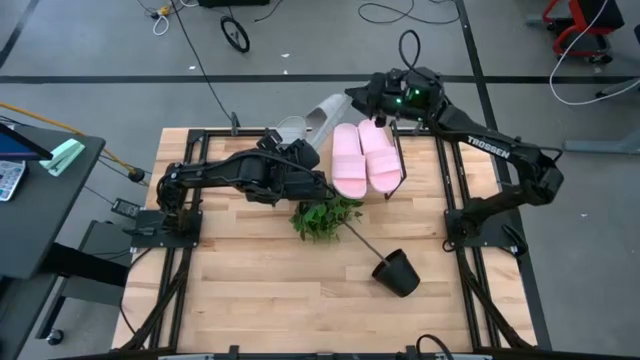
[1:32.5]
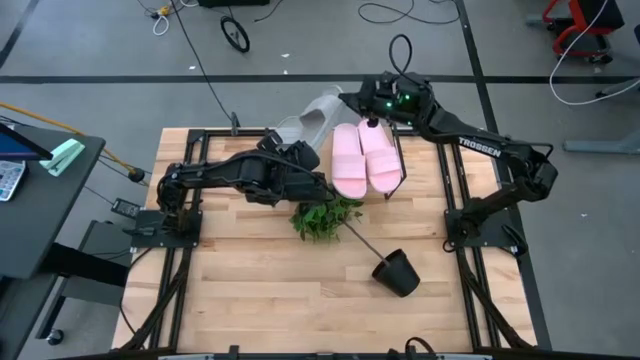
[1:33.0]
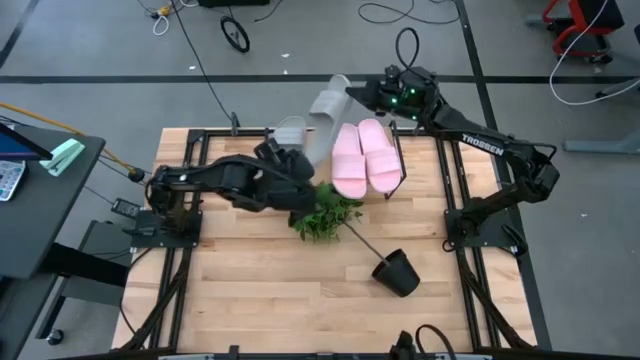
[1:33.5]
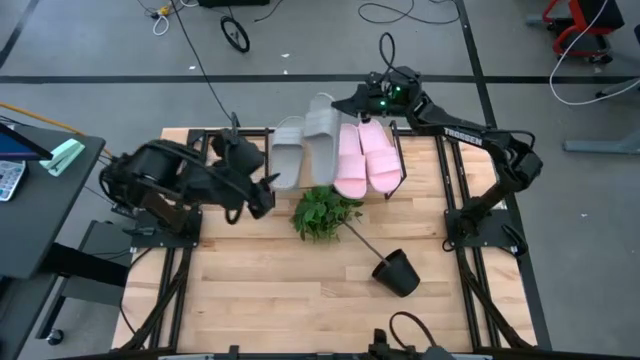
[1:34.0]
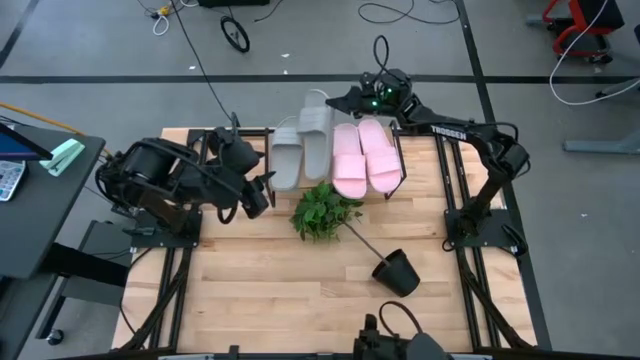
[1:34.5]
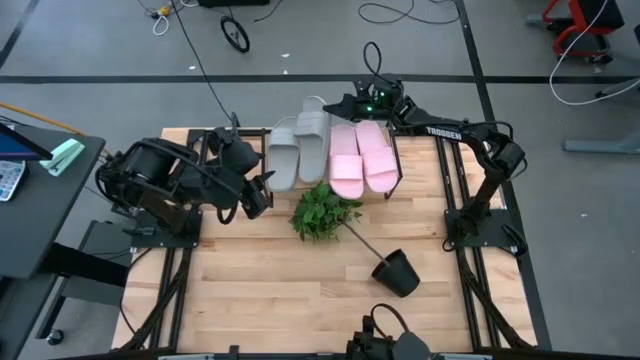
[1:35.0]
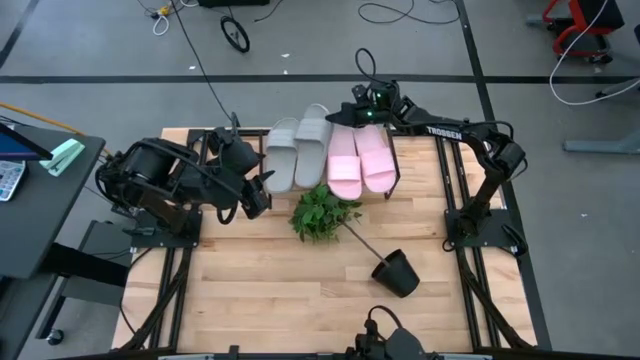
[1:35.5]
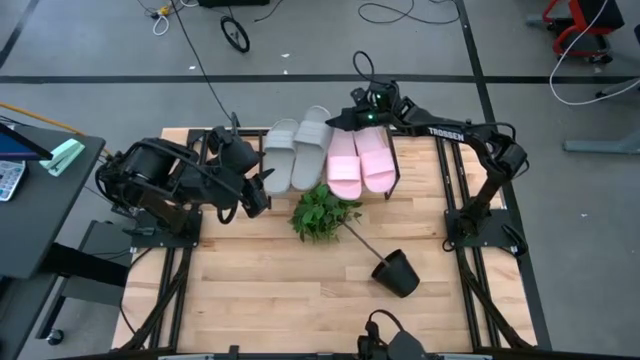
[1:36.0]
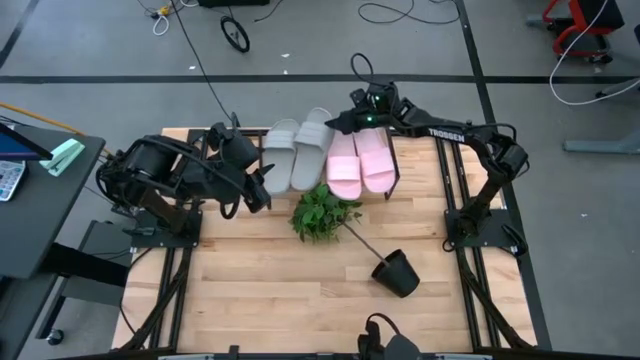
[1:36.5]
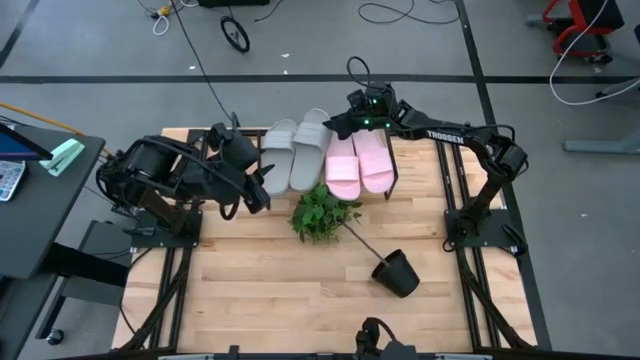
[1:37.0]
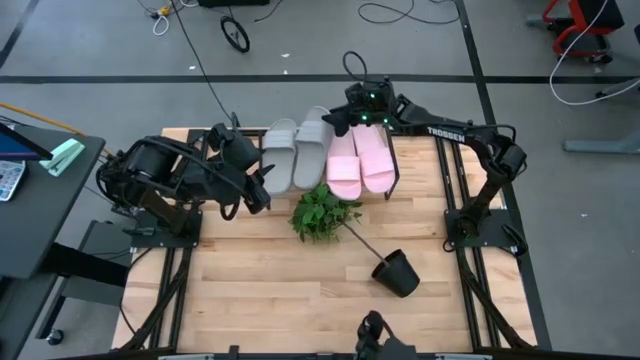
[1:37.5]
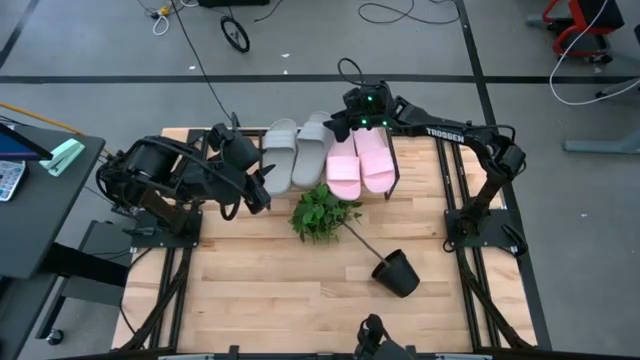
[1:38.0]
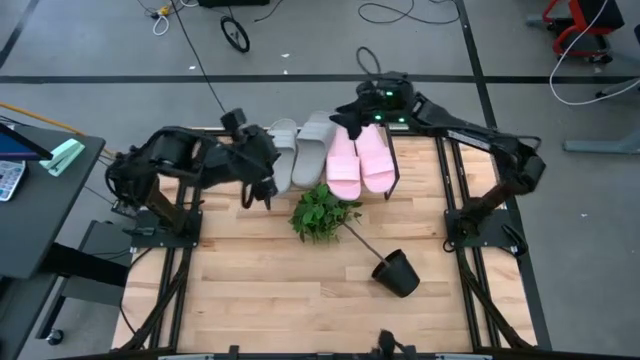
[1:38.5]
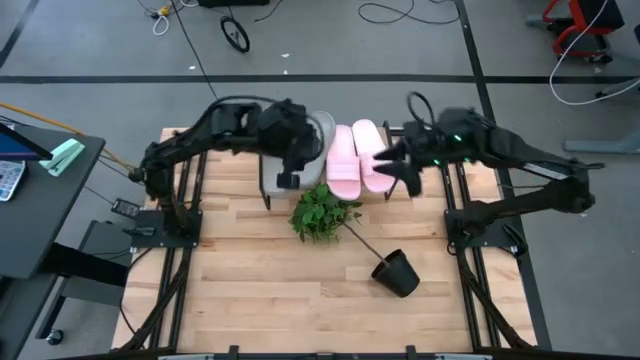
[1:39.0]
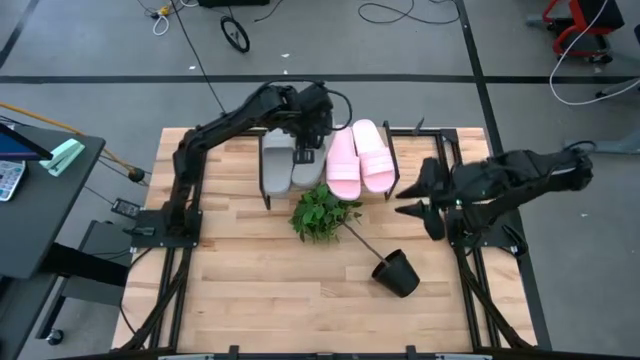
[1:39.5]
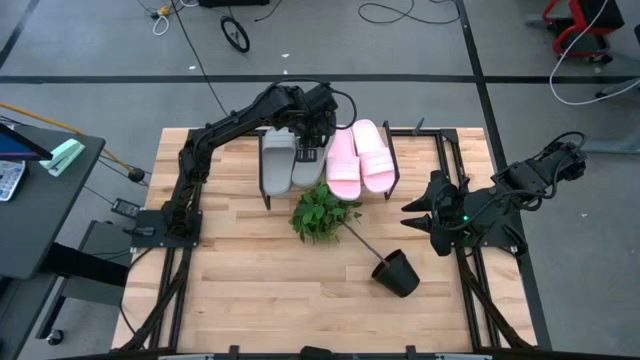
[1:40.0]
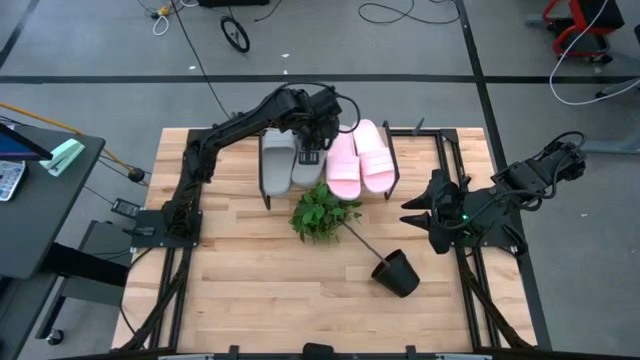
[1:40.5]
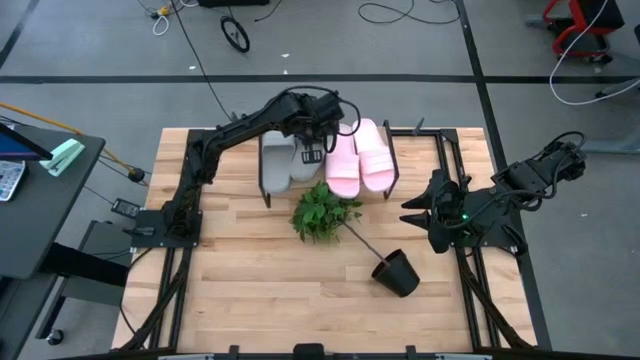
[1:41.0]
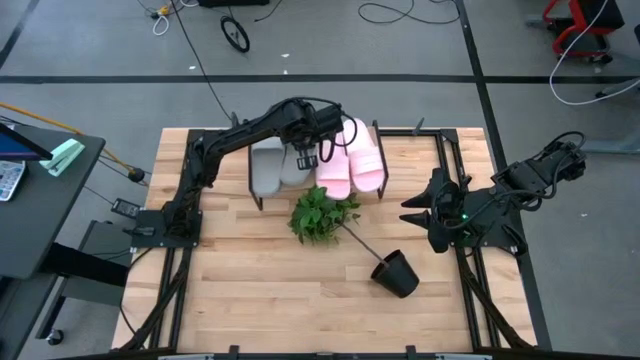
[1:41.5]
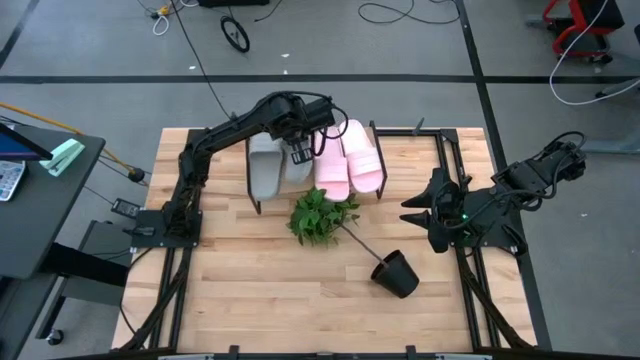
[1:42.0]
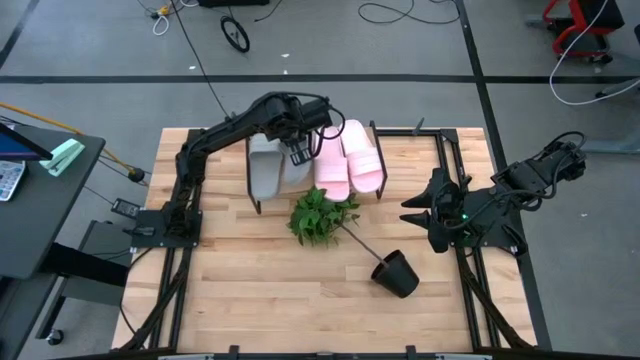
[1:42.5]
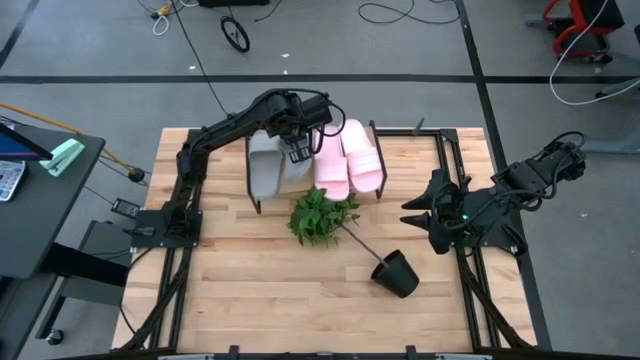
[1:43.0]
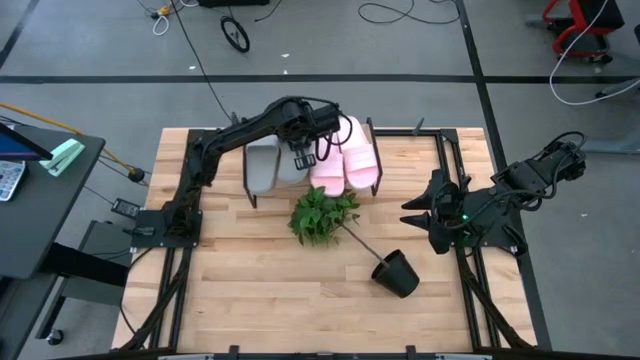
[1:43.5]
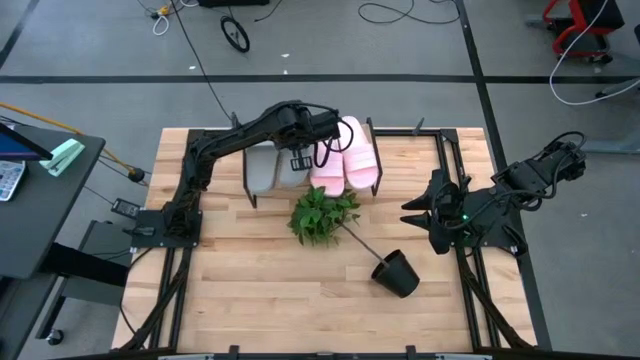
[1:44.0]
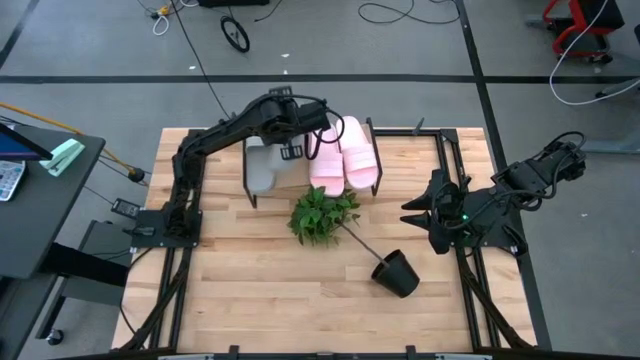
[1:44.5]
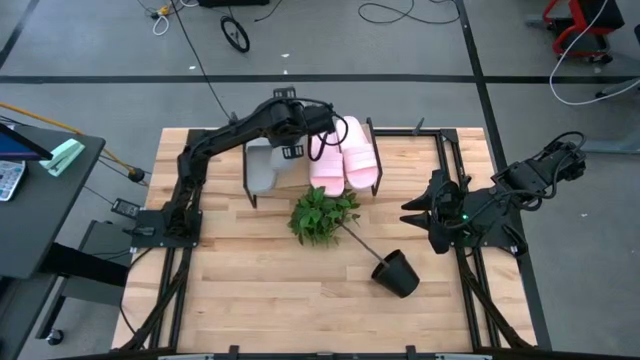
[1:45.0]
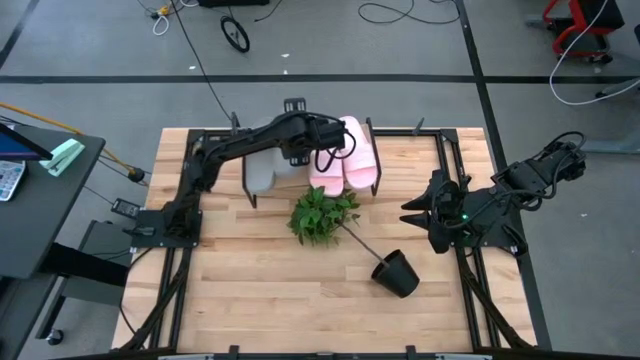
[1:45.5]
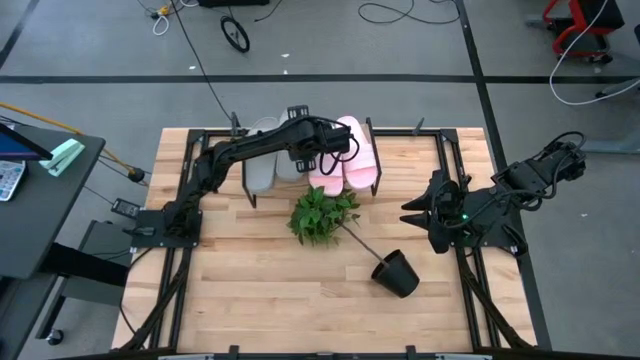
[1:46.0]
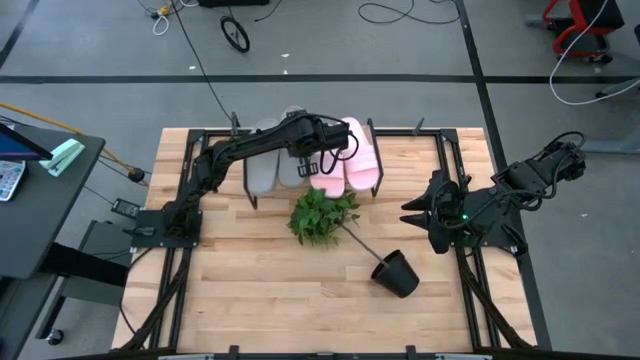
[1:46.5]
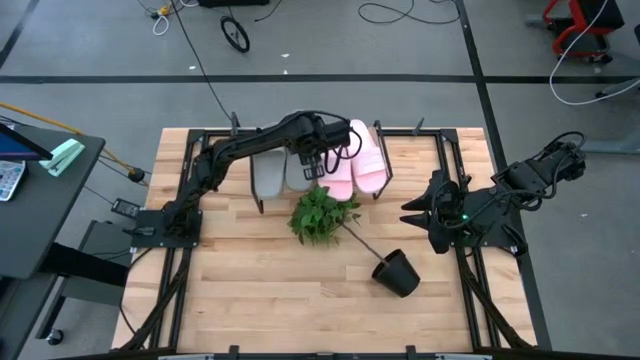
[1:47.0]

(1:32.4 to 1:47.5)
Task: Pick and place slides into the shelf
Put the gray slides on the shelf

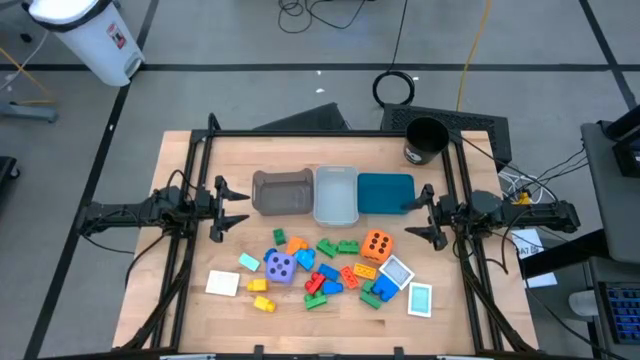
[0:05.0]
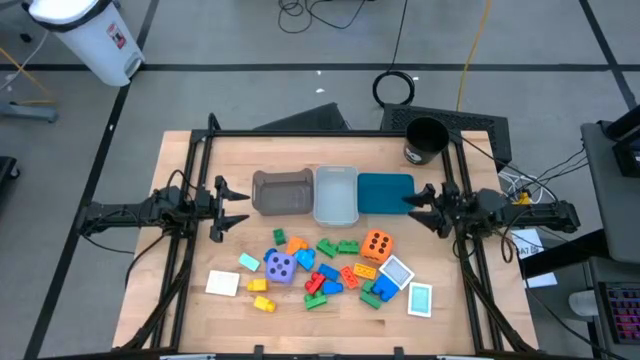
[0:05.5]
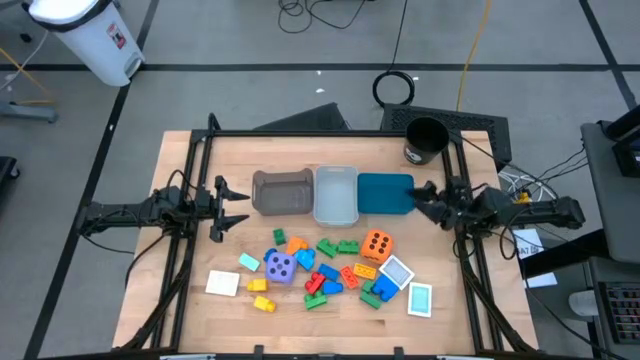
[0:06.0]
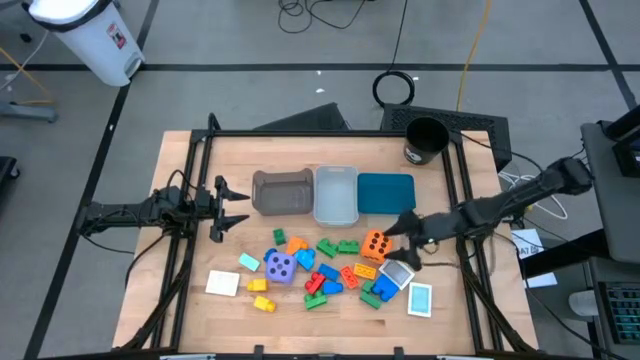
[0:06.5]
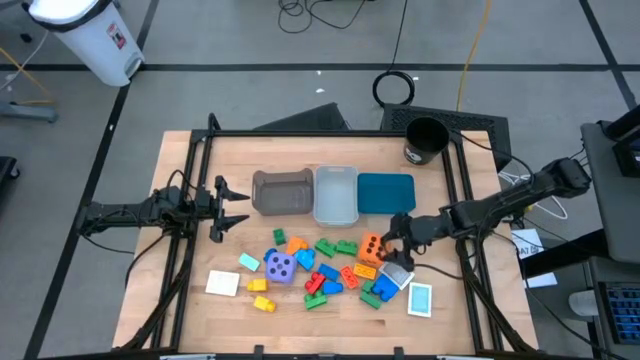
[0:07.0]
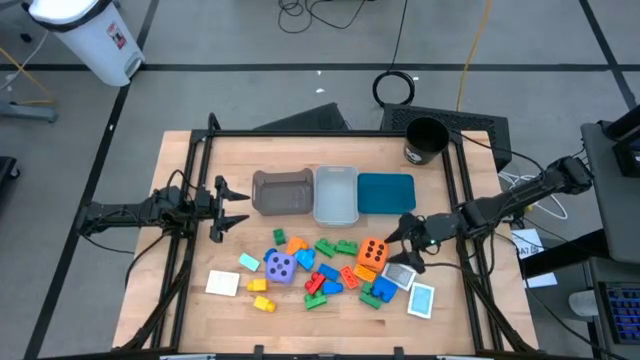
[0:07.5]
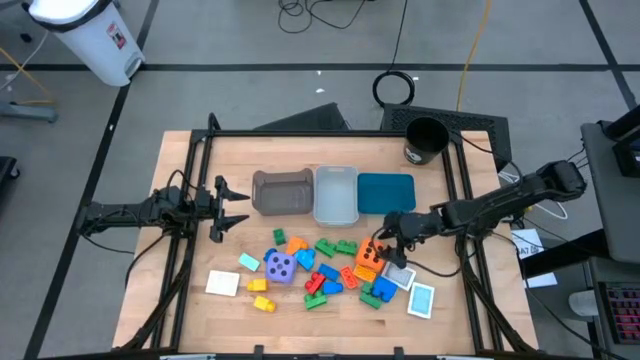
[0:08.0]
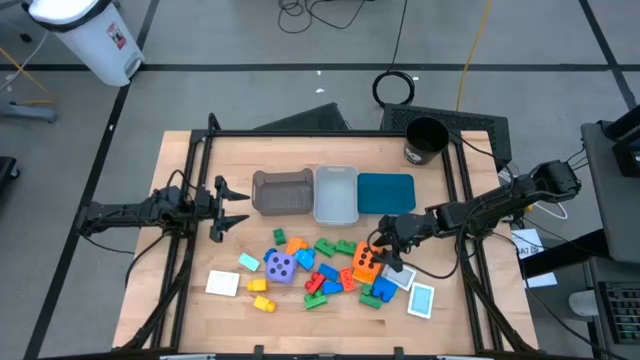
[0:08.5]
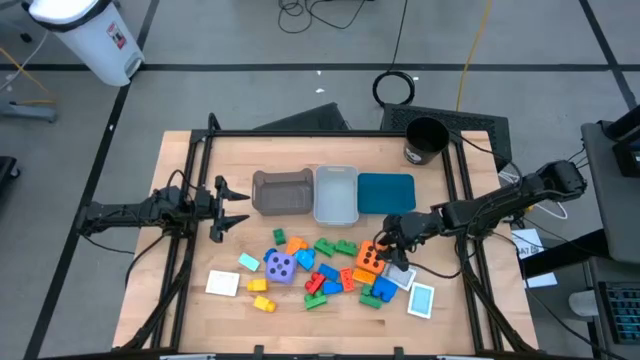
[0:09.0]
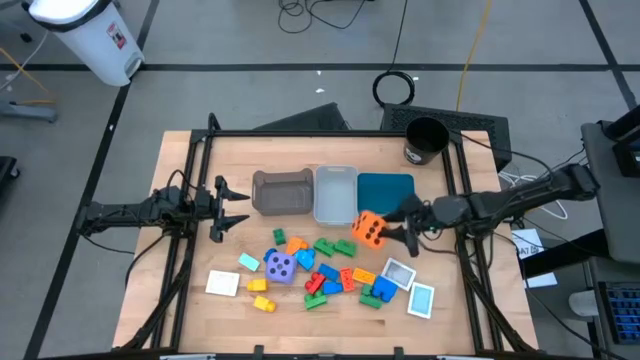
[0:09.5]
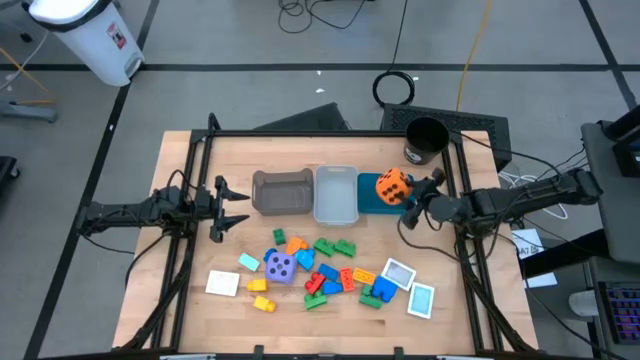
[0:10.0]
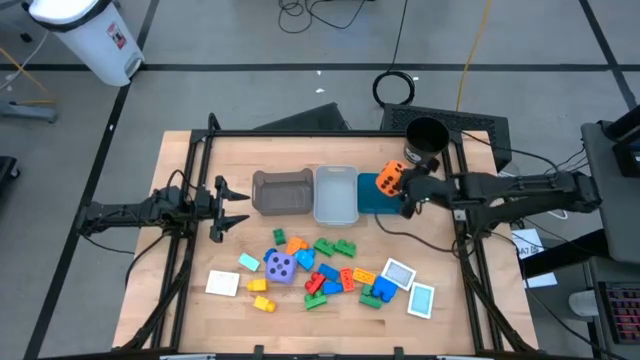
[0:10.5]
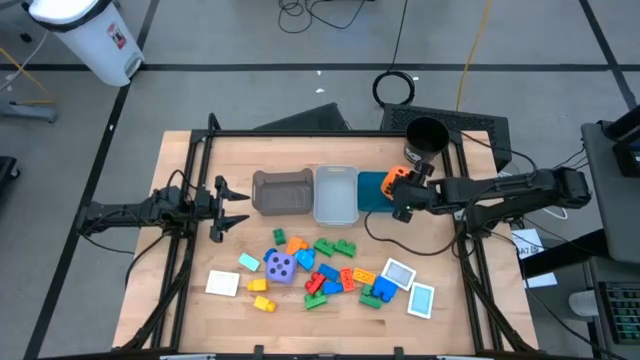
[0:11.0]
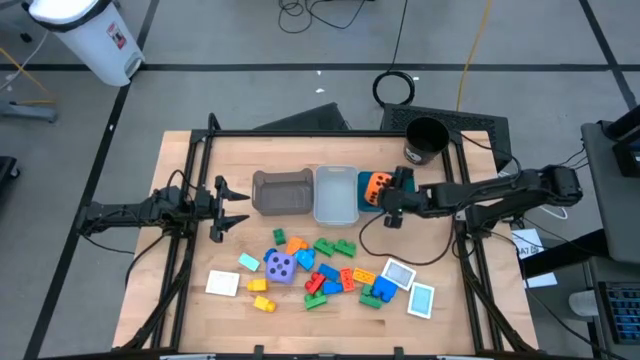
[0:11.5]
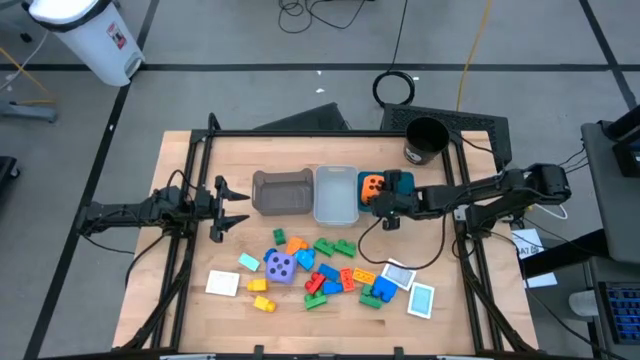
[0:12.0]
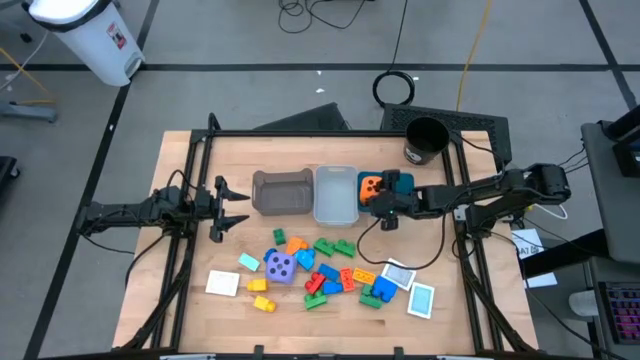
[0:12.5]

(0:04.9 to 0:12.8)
Task: Pick & Place Toys
Put the orange die into the blue bin
